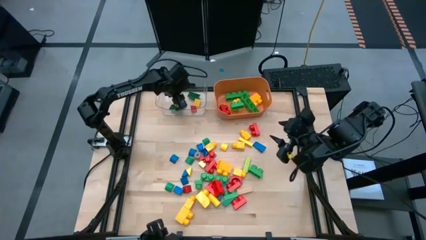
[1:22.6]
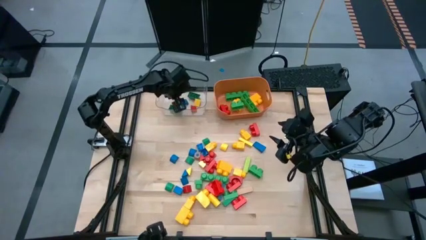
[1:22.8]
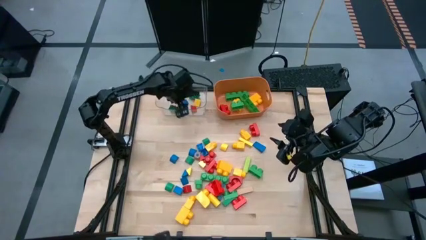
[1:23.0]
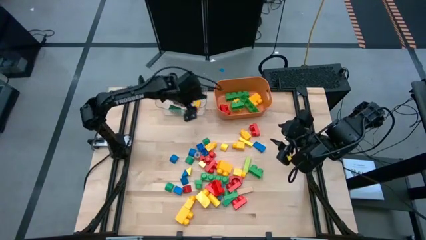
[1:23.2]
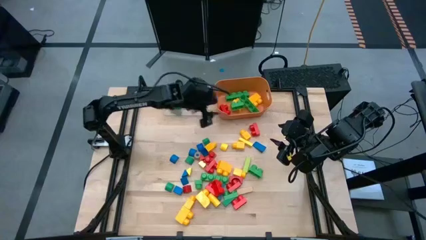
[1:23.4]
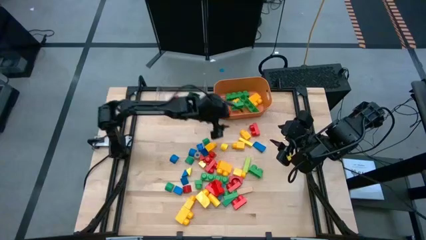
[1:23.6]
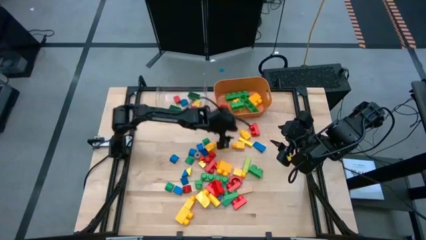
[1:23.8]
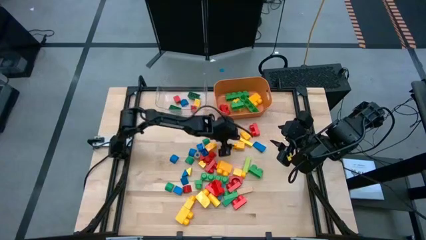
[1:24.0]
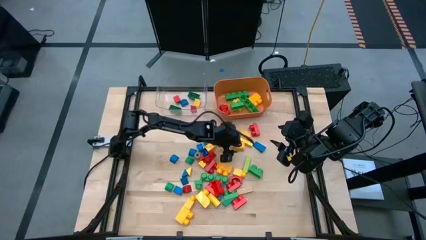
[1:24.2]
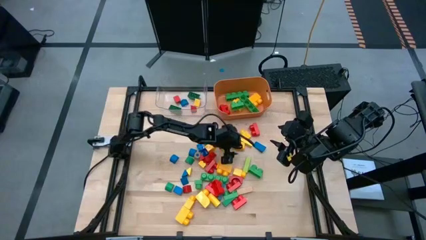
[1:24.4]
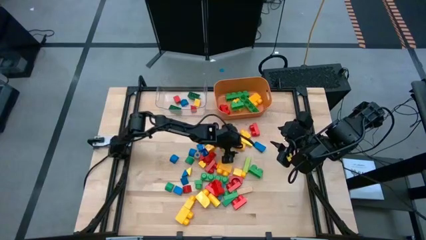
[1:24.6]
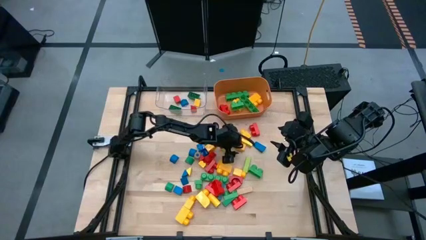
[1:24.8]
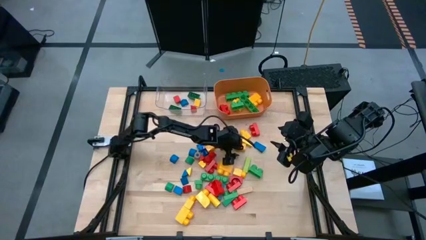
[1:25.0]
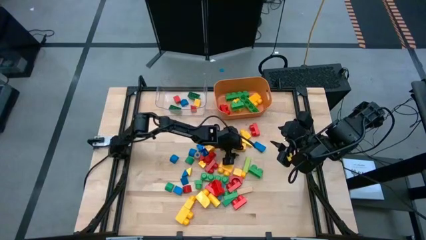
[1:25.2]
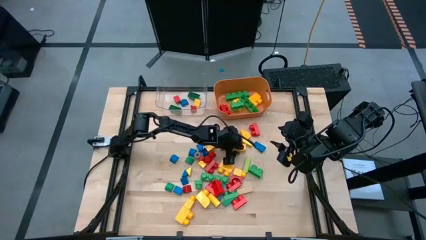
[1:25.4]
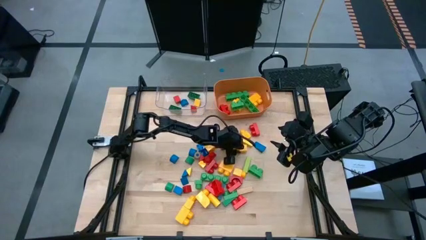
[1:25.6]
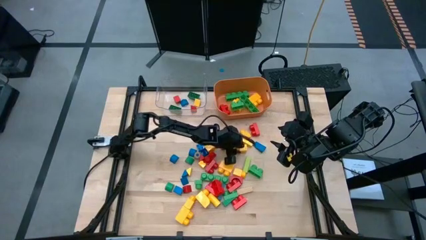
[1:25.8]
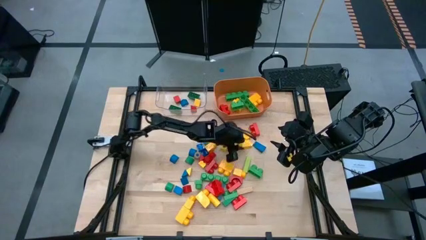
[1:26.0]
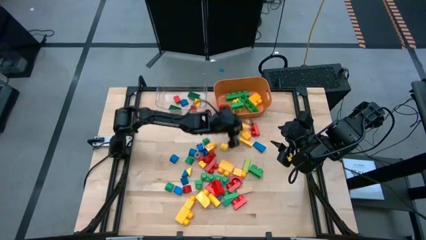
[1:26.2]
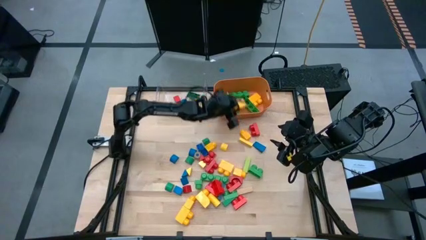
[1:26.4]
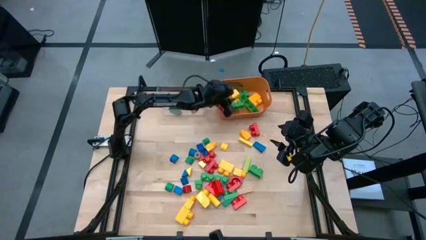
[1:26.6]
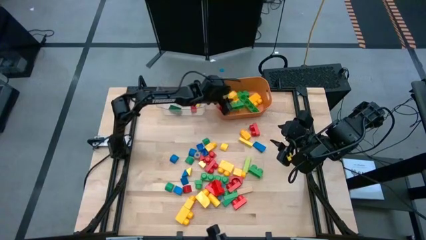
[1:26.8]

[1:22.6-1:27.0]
Task: Sort blocks by size
Put the big yellow game piece into the orange bin

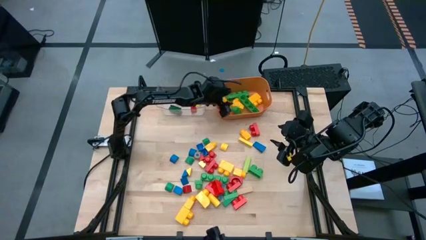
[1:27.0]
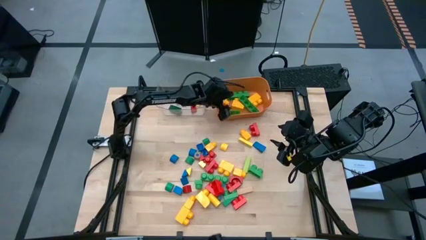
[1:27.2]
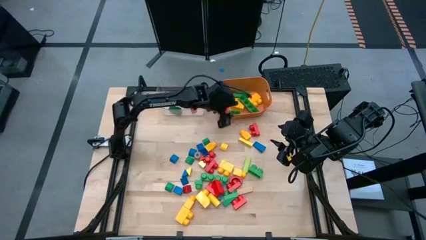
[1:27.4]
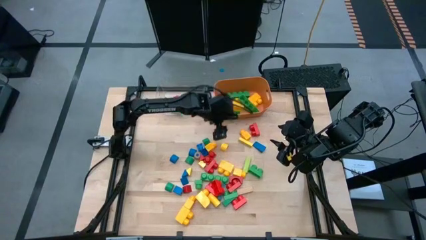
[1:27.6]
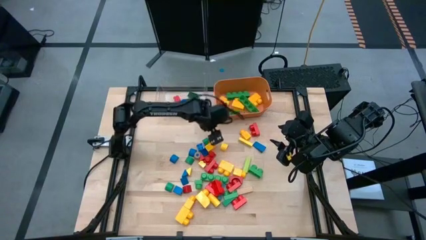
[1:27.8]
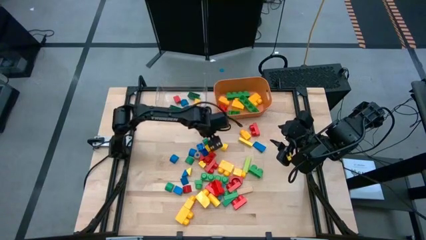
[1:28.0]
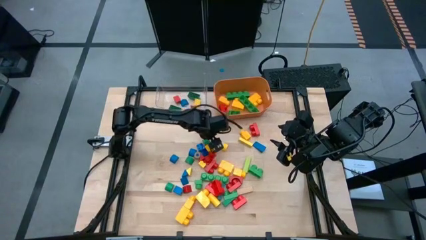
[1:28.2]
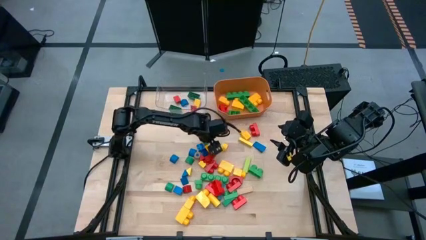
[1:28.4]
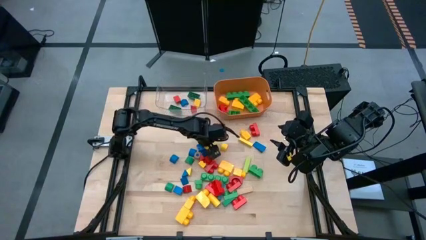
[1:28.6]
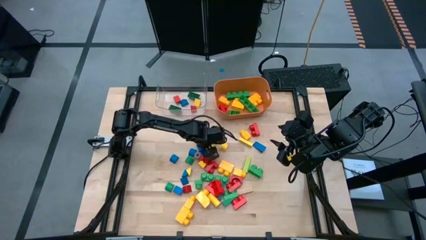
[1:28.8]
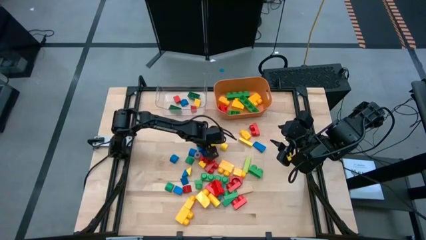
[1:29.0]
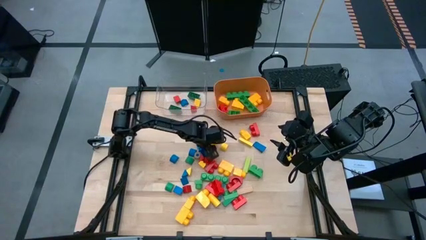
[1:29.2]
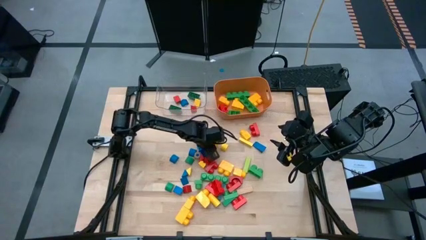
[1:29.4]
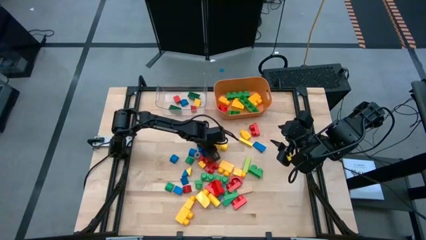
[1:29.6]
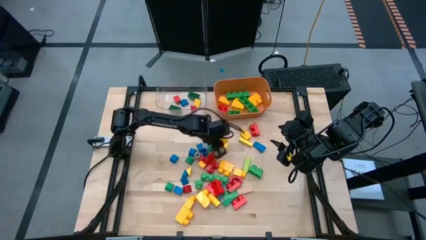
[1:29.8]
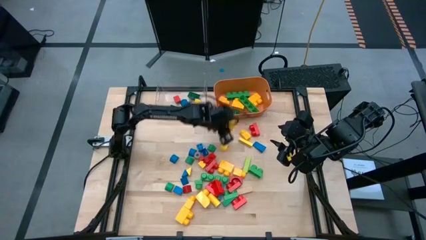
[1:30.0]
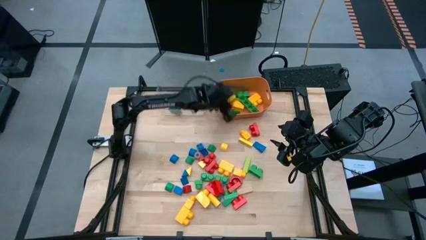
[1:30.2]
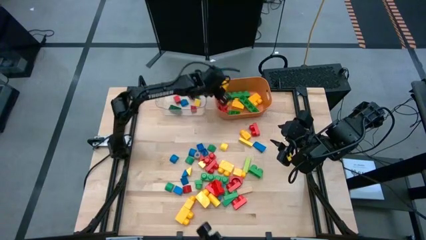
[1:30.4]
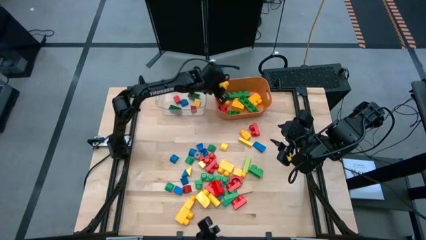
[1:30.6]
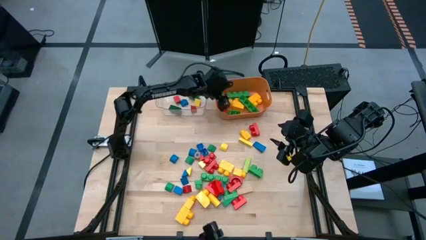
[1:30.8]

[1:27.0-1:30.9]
Put the big yellow game piece into the orange bin

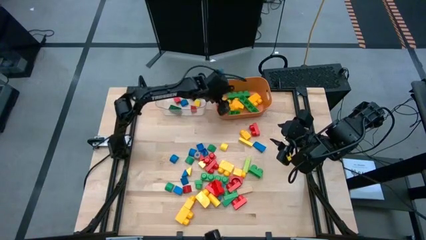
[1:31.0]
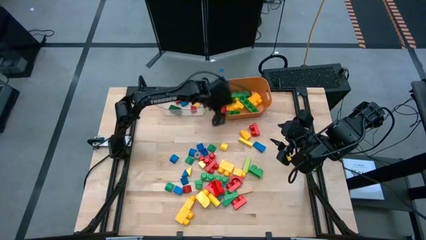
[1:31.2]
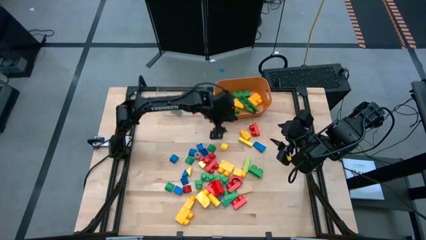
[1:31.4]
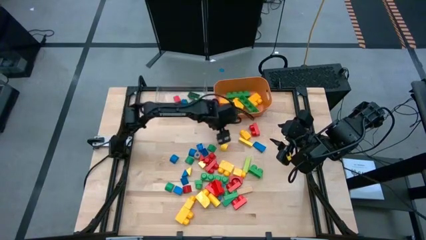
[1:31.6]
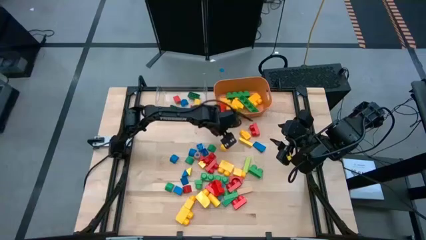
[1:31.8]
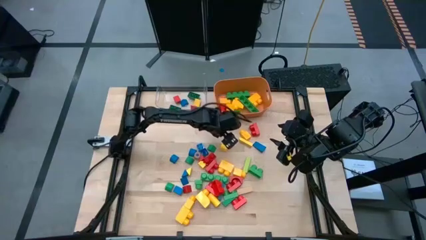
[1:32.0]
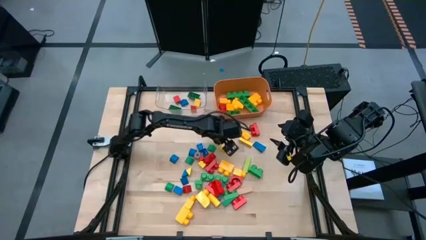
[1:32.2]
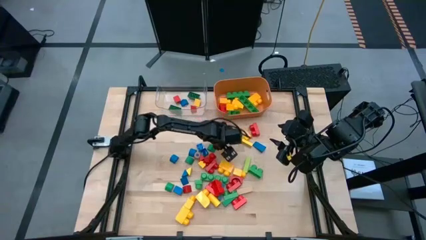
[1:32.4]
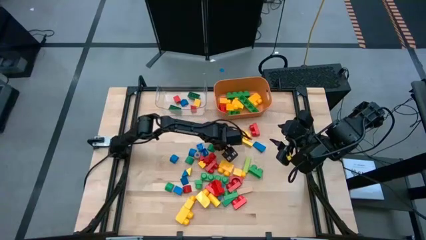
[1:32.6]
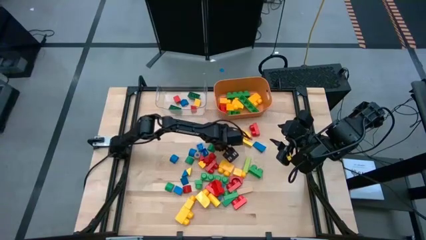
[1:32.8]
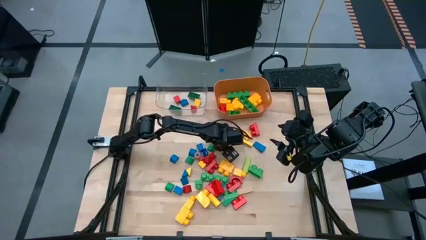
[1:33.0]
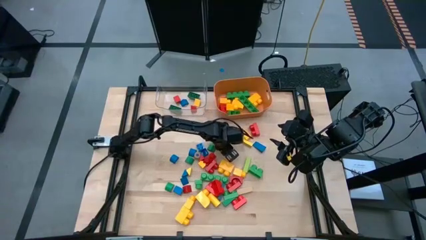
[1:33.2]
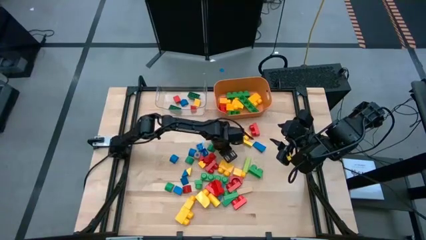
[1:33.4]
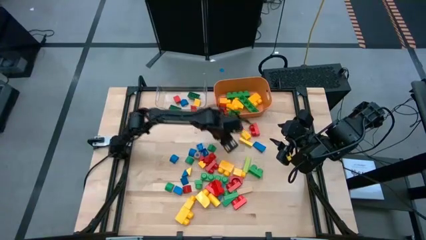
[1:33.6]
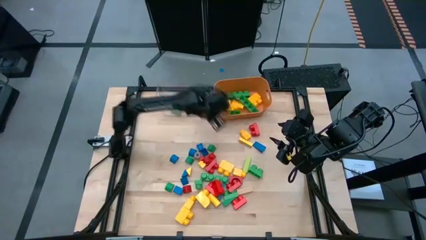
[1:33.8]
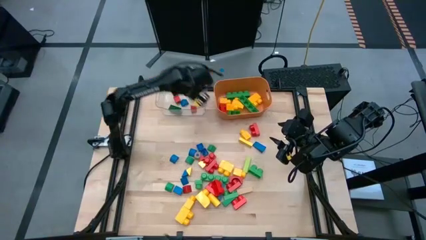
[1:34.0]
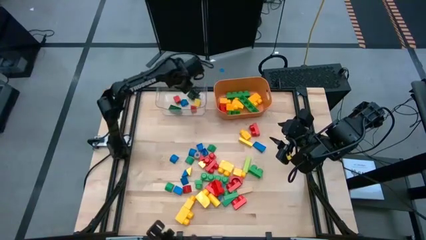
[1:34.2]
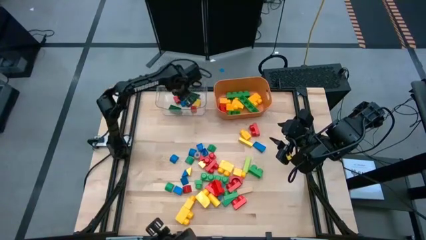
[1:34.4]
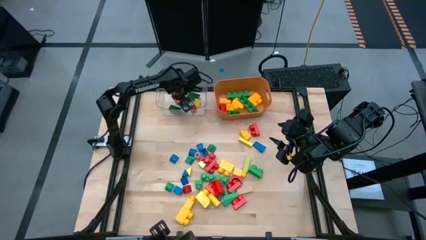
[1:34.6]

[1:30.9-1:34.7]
Put the small yellow block into the transparent bin

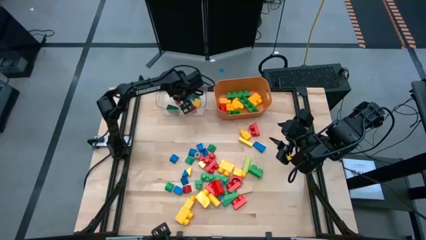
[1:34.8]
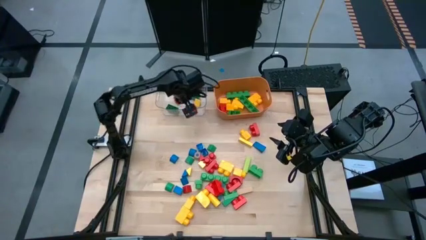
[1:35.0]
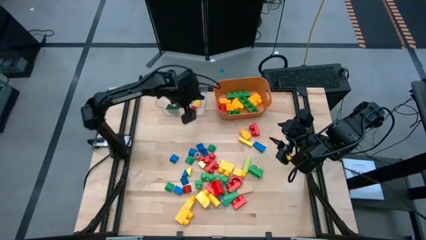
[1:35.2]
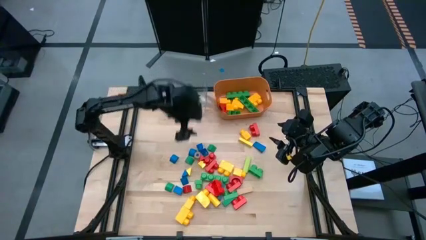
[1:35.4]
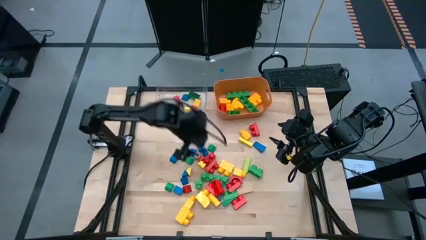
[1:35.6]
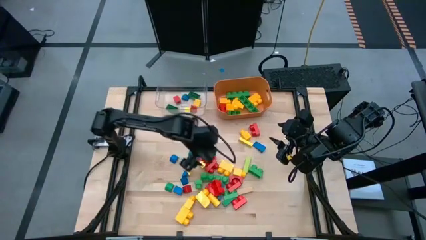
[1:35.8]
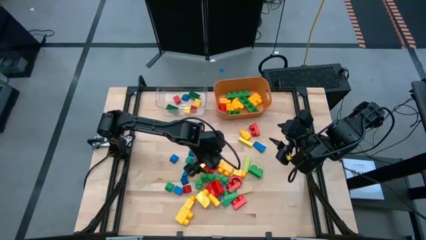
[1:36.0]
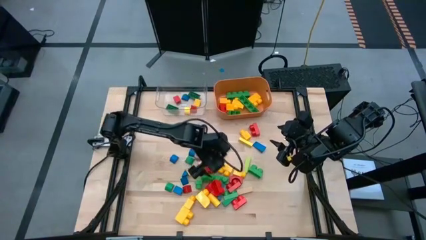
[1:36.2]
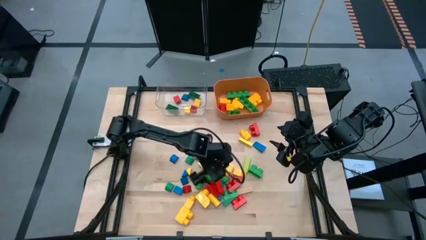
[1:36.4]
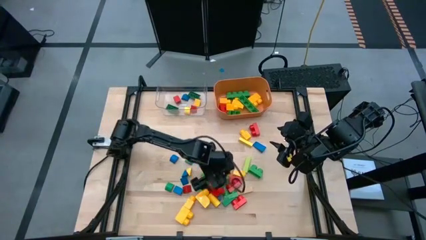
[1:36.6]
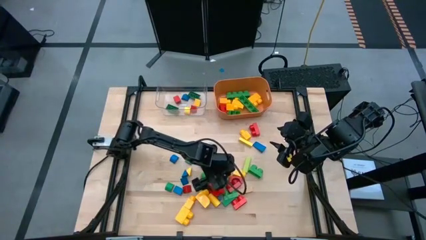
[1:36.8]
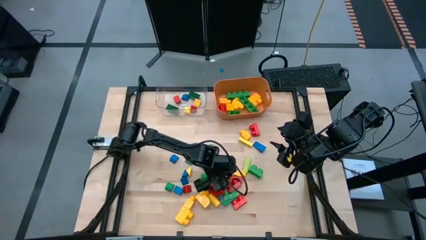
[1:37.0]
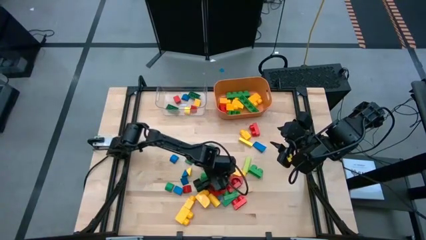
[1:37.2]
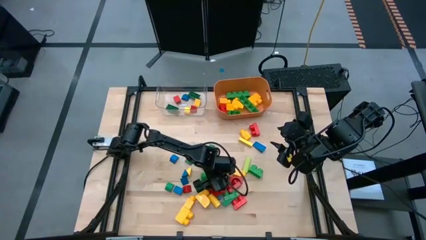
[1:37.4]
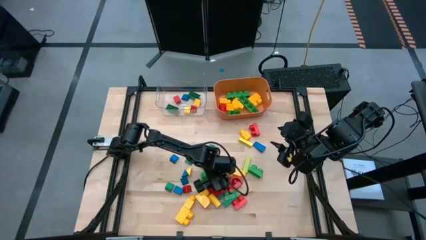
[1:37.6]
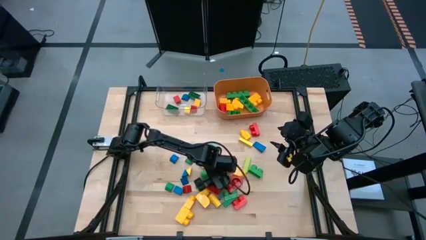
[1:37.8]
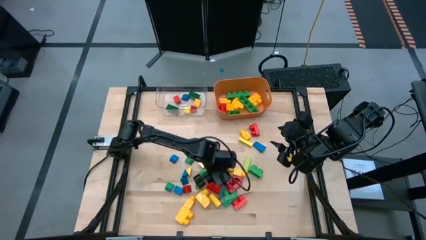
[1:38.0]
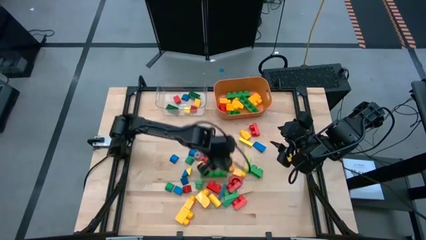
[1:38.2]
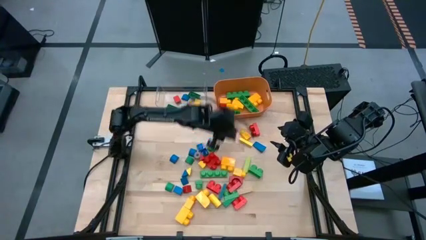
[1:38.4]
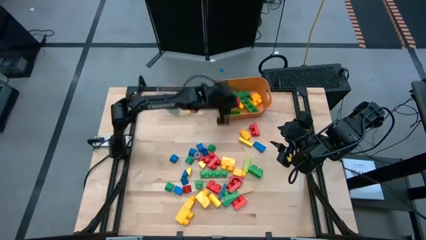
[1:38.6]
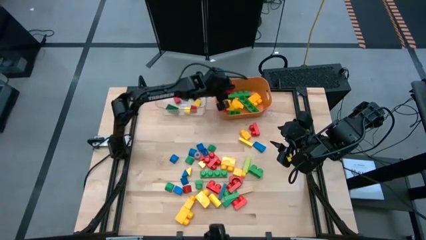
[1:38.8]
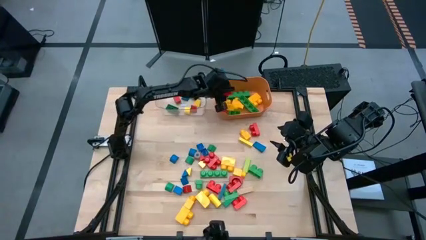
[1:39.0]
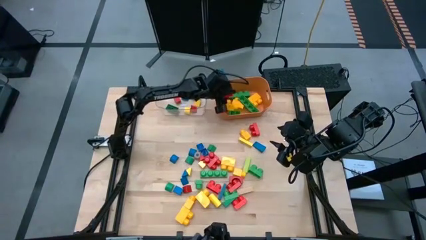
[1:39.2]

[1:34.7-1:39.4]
Put the big red game piece into the orange bin
